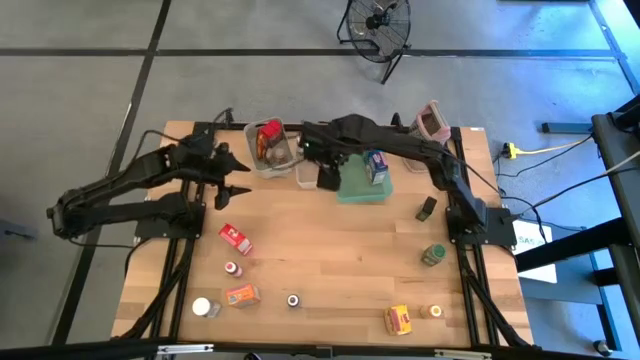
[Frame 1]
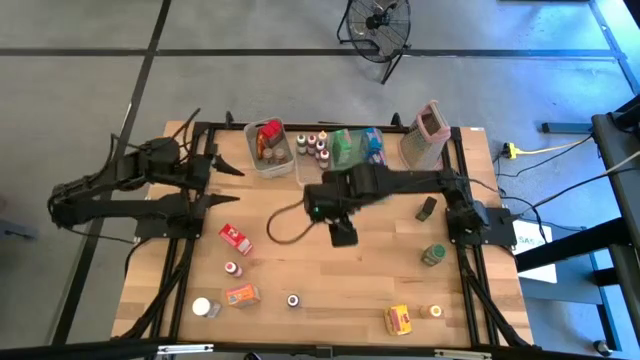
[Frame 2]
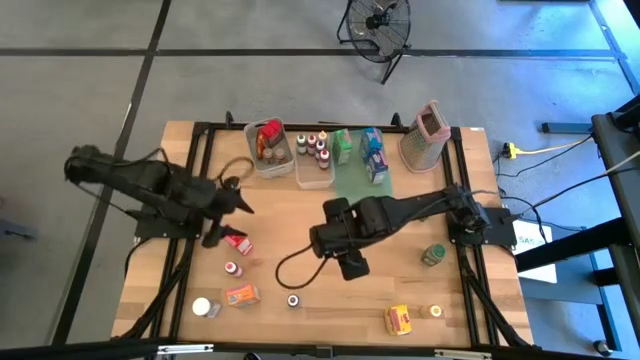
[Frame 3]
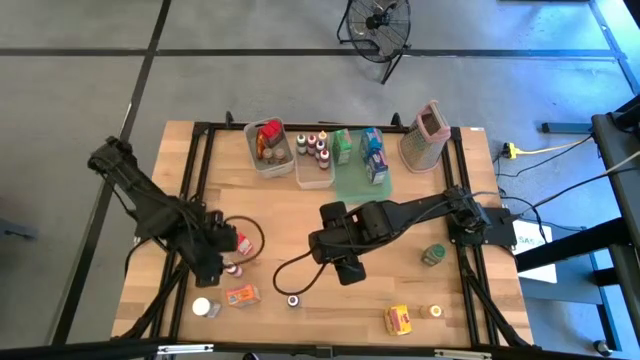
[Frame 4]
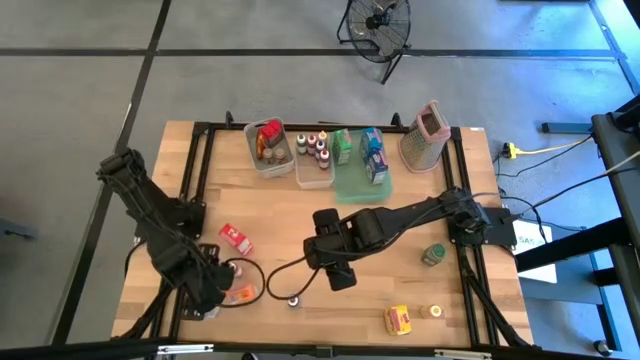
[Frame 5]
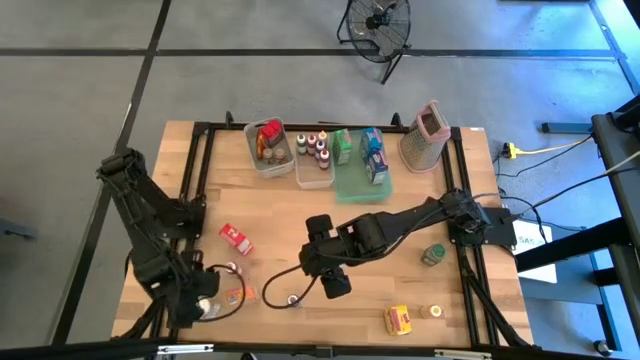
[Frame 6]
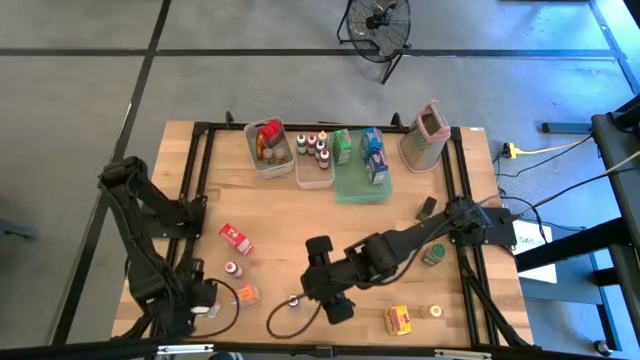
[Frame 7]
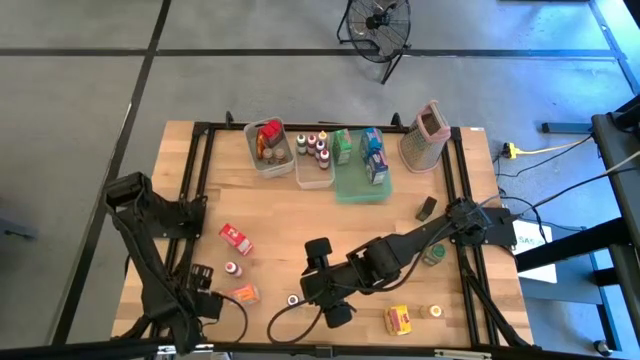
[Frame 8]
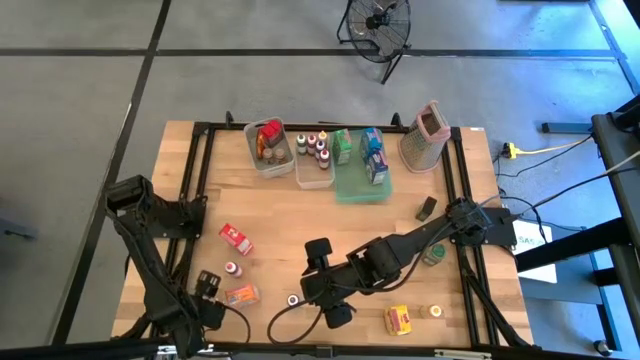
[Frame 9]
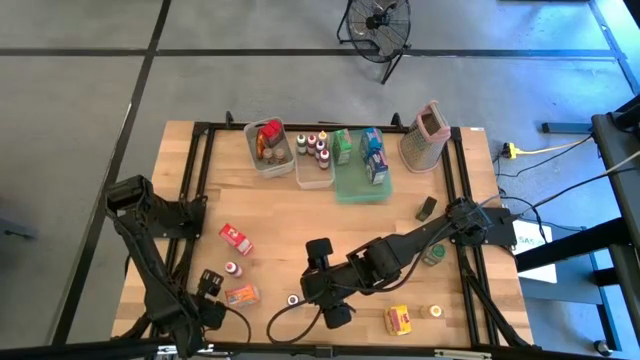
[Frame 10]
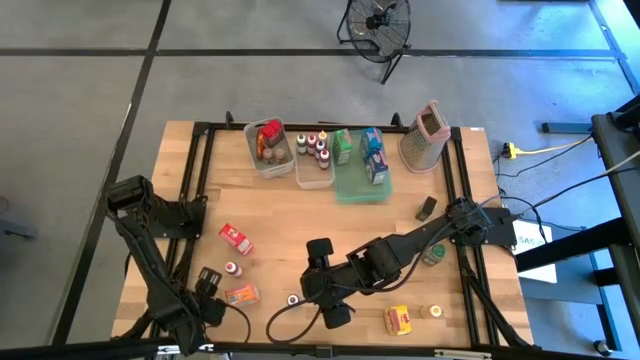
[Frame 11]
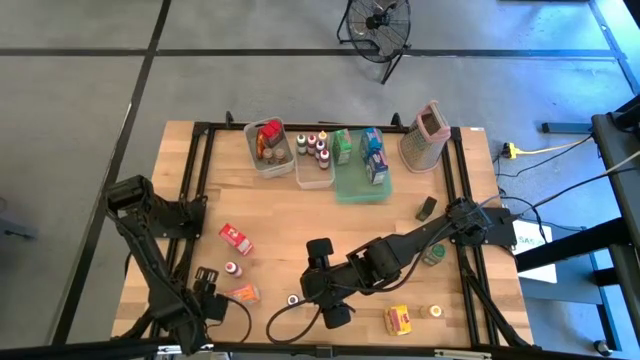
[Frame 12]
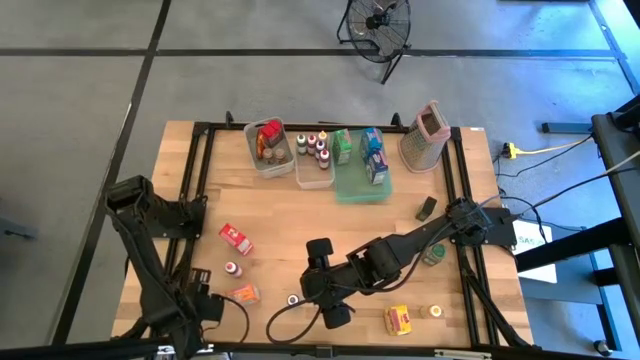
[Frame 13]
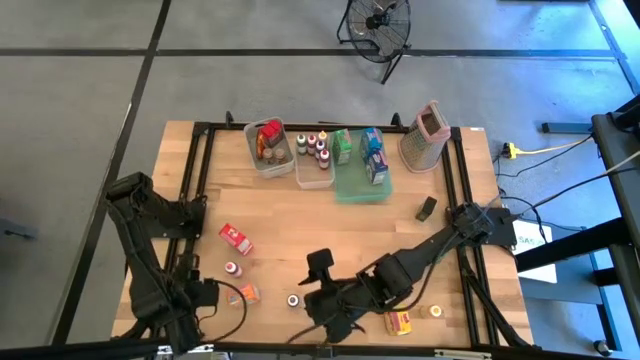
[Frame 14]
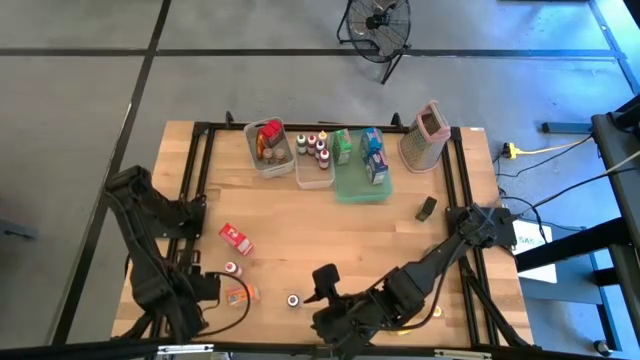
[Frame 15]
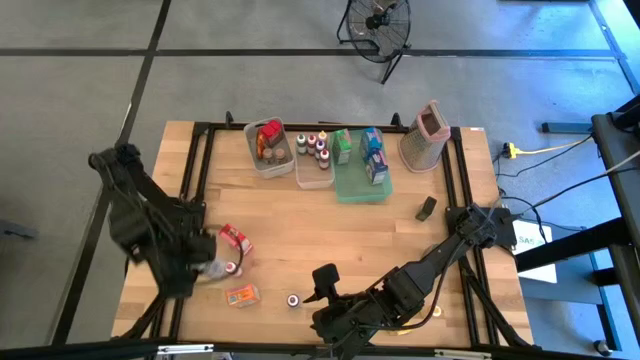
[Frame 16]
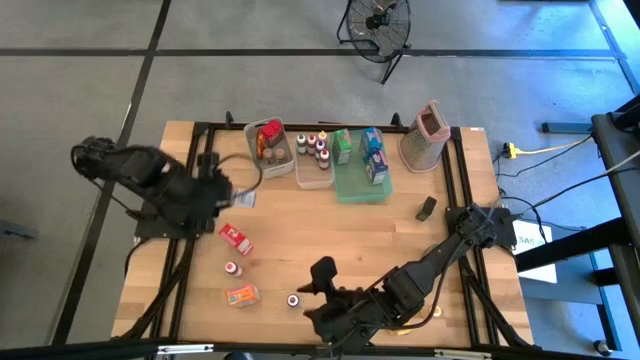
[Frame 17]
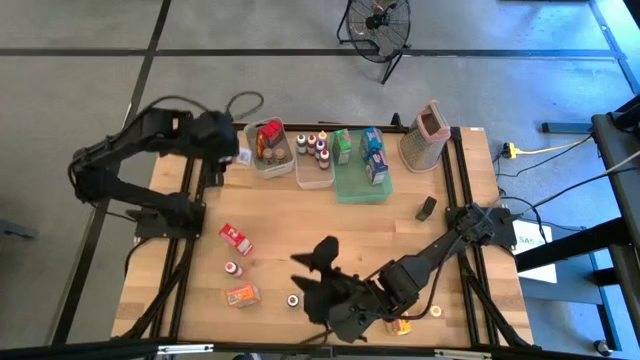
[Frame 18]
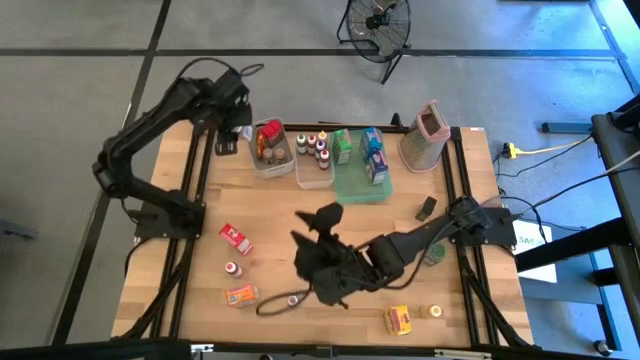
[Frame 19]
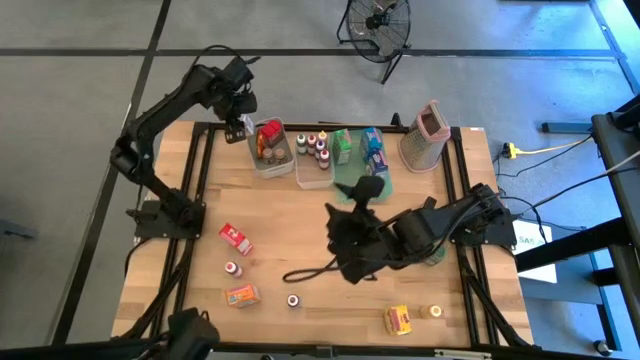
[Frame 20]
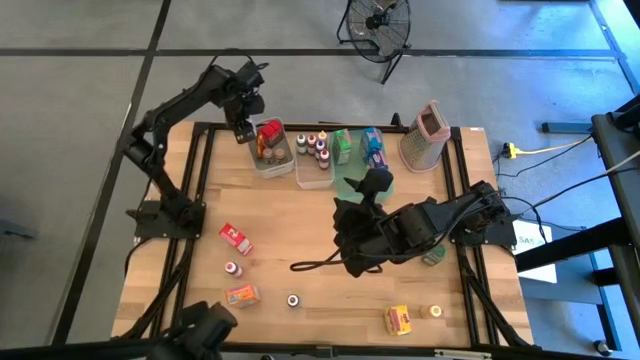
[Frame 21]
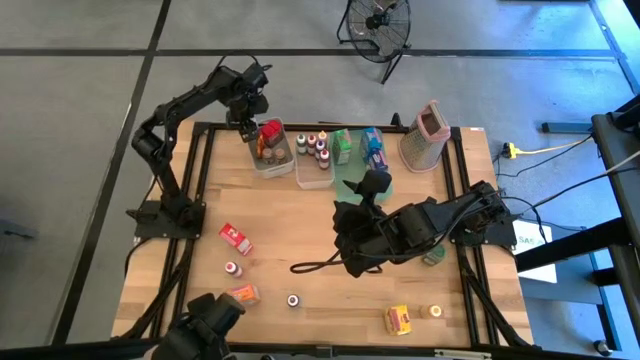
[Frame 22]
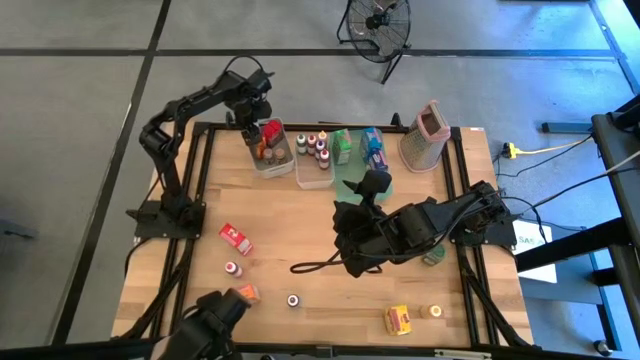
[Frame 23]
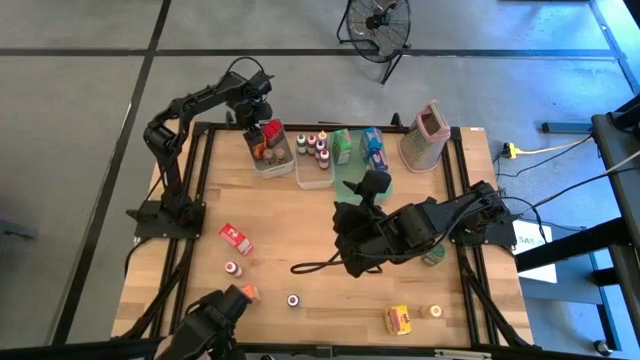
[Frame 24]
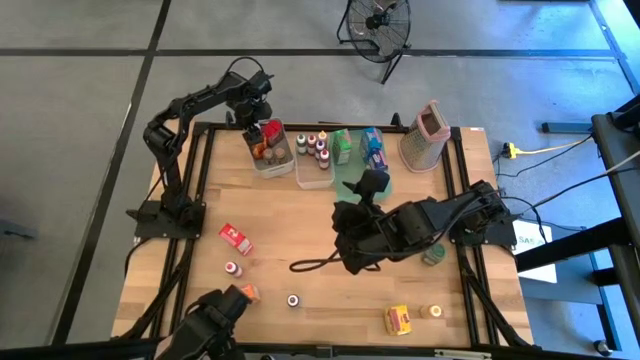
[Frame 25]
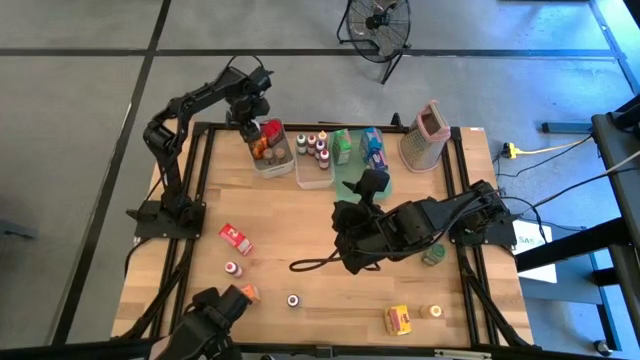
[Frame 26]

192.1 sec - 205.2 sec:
Task: Pick & Place Kitchen Items
Put the white seasoning bottle into the gray bin

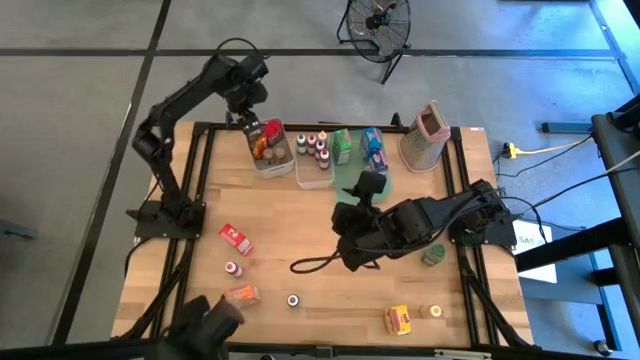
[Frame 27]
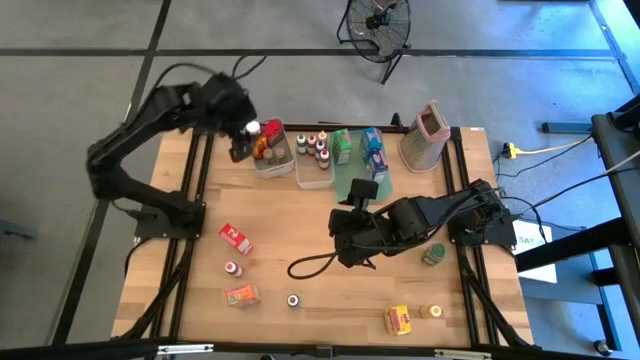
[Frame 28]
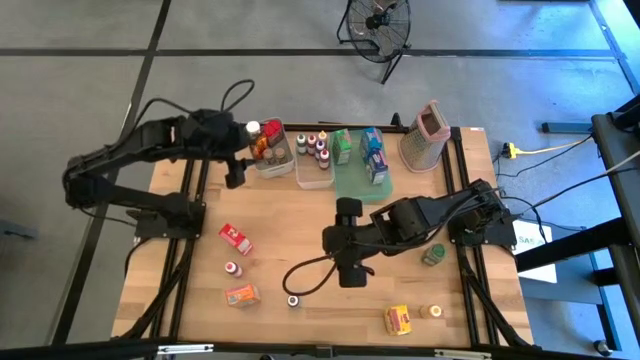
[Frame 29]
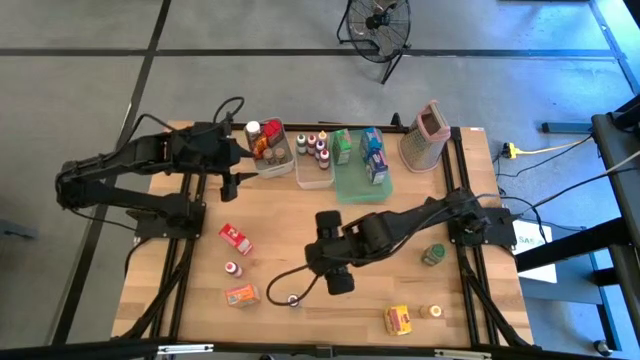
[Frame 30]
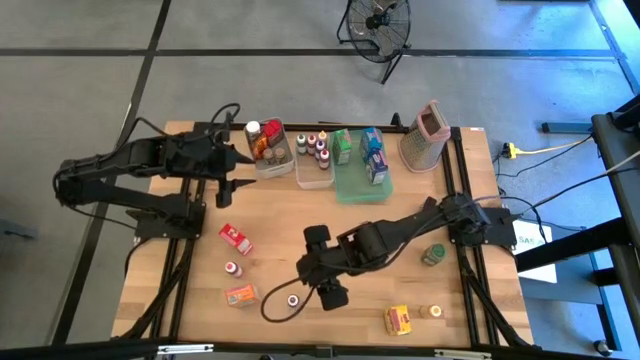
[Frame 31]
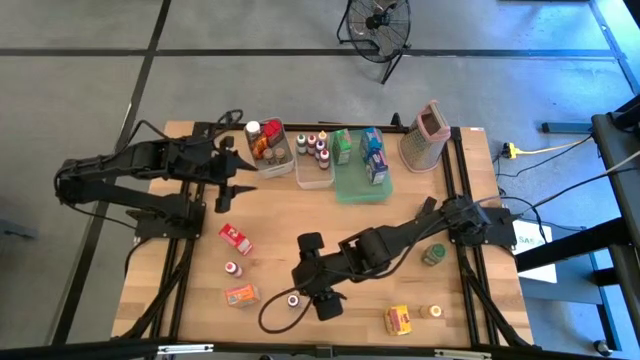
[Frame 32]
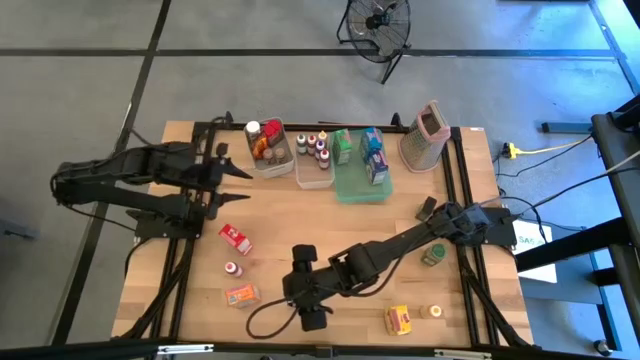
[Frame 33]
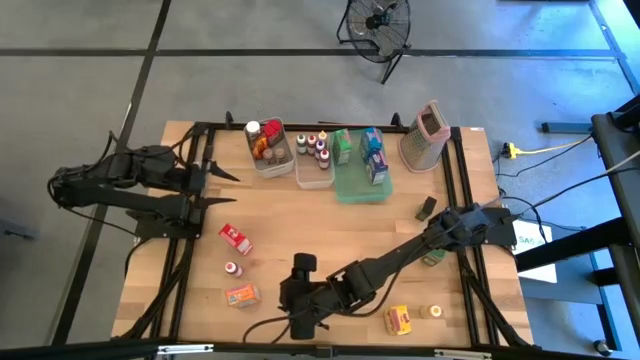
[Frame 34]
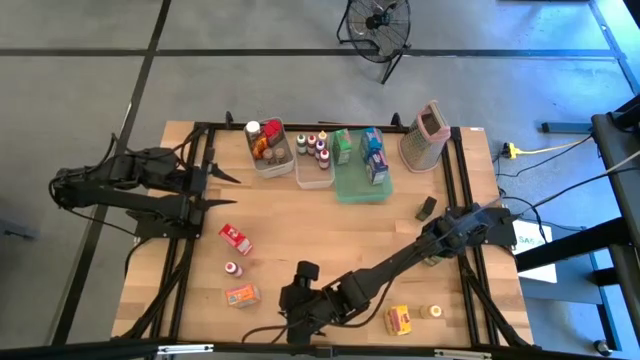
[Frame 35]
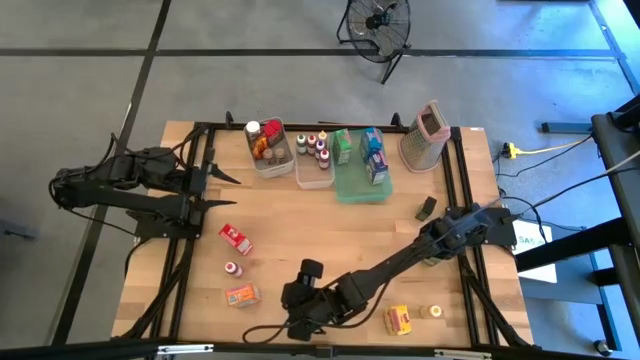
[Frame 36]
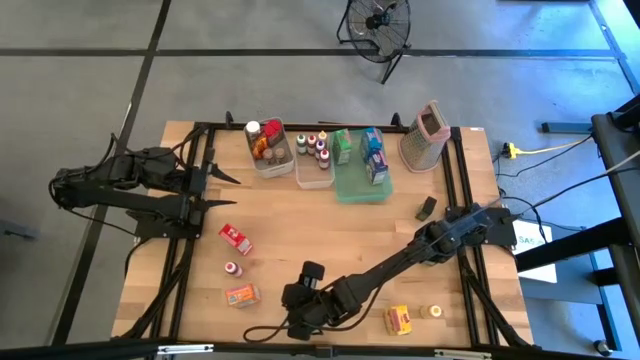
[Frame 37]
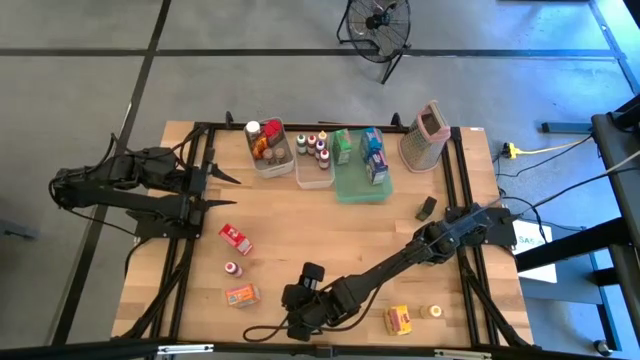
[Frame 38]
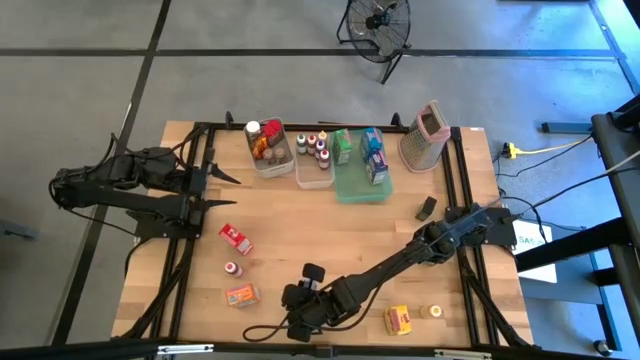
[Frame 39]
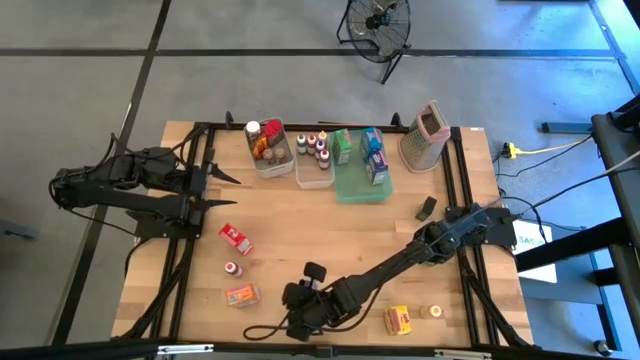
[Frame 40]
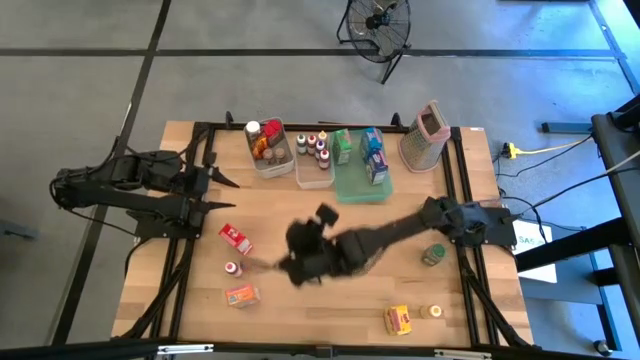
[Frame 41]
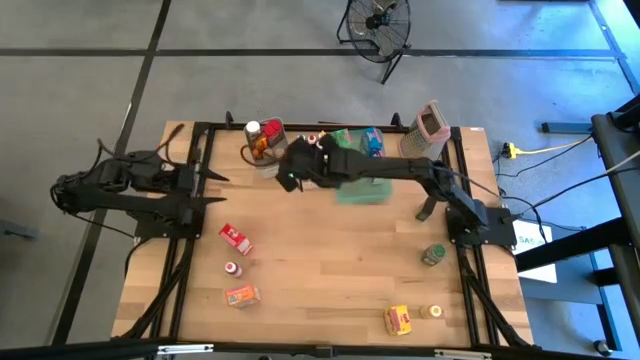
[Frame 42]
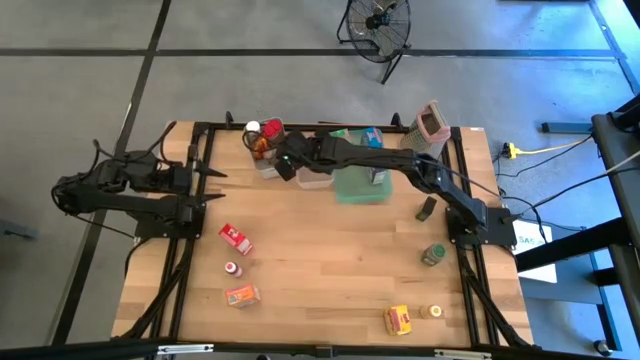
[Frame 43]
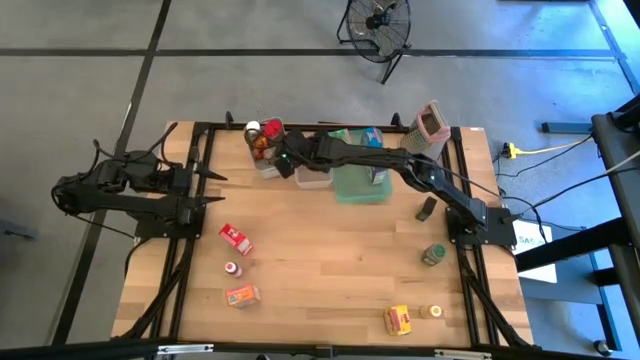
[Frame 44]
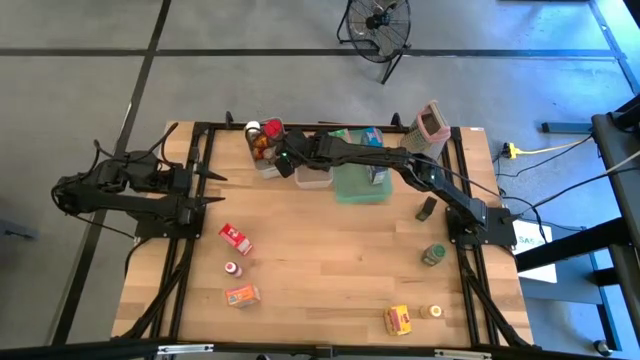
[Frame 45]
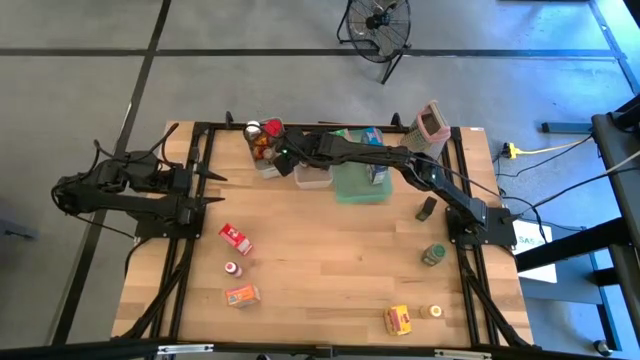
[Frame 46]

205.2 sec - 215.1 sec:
Put the violet food coloring bottle into the transparent bin
